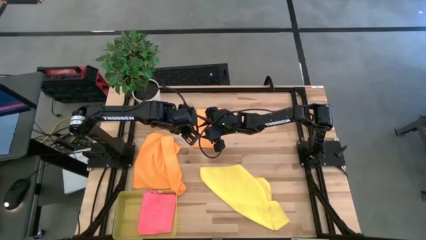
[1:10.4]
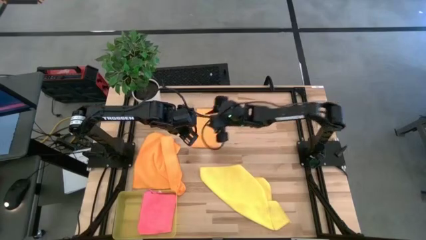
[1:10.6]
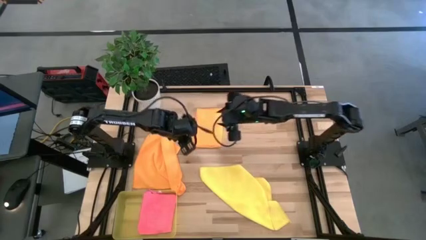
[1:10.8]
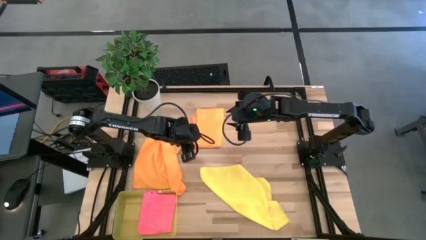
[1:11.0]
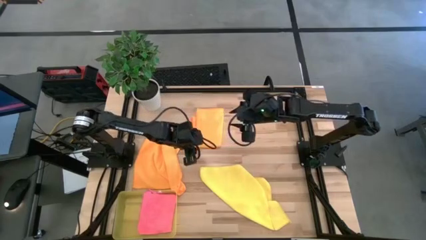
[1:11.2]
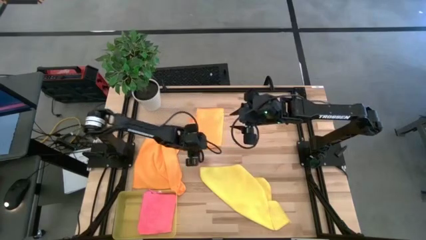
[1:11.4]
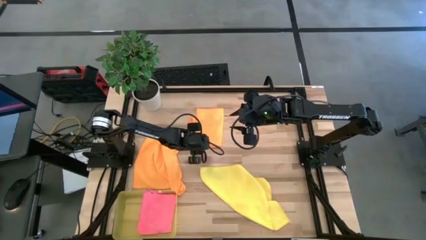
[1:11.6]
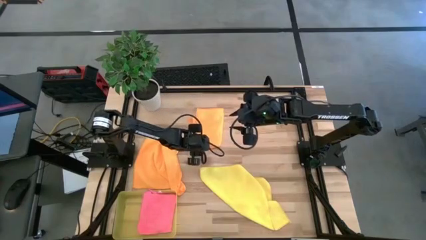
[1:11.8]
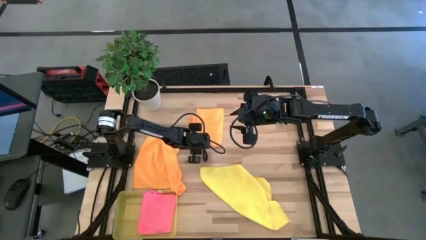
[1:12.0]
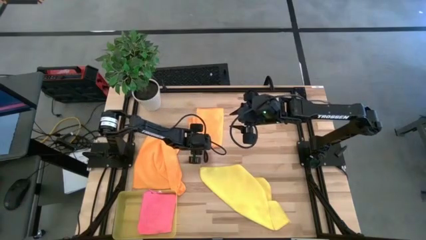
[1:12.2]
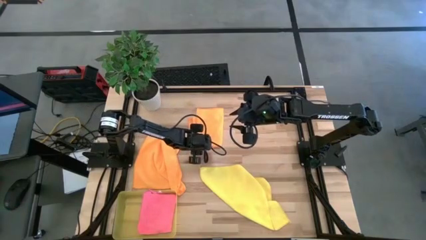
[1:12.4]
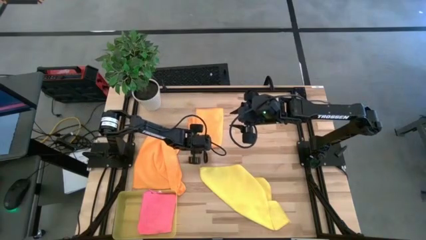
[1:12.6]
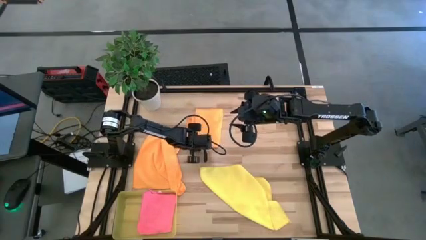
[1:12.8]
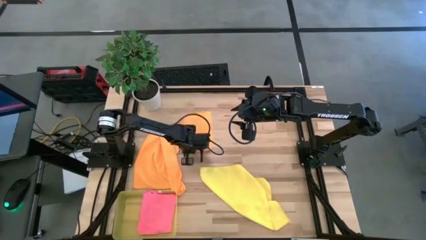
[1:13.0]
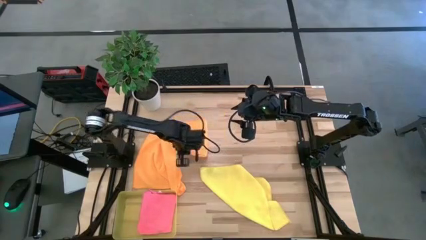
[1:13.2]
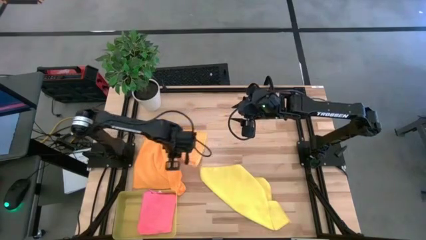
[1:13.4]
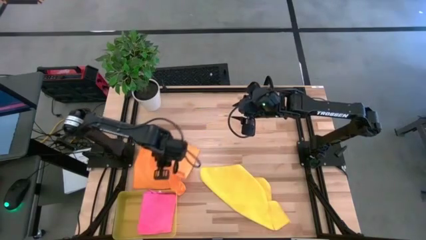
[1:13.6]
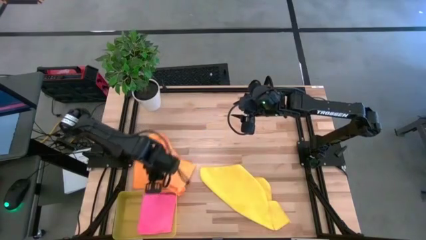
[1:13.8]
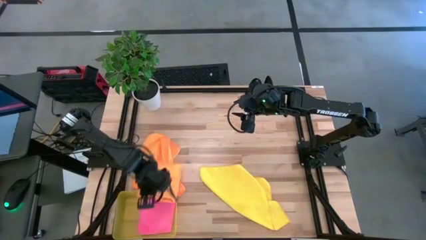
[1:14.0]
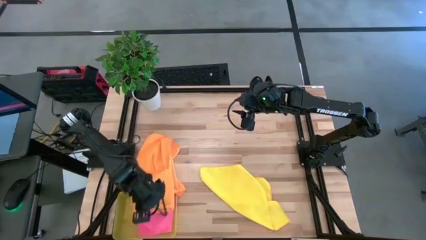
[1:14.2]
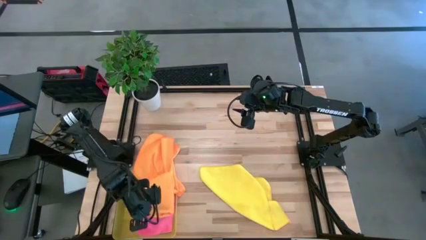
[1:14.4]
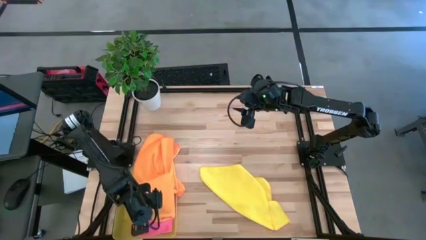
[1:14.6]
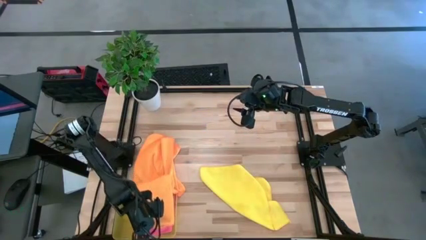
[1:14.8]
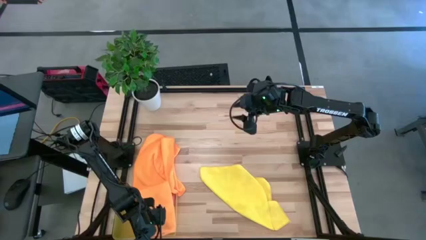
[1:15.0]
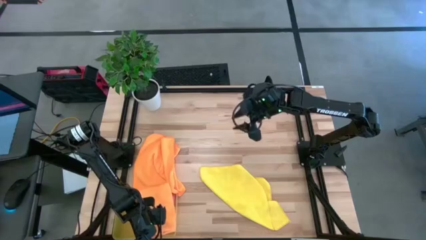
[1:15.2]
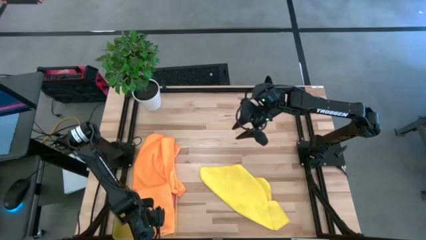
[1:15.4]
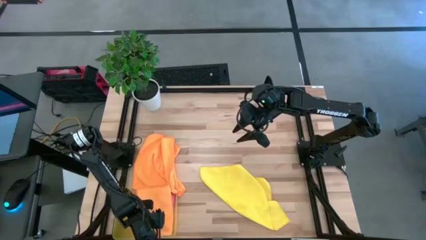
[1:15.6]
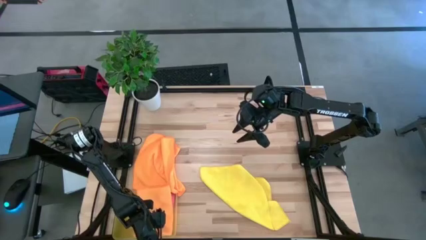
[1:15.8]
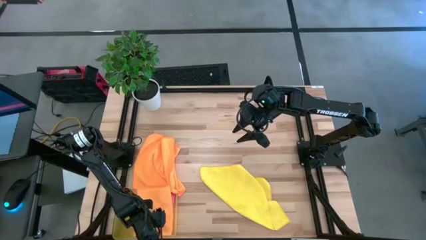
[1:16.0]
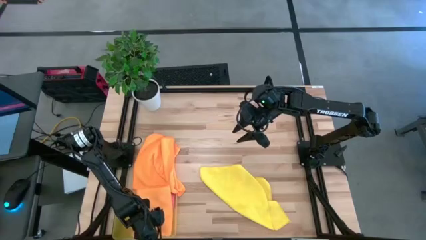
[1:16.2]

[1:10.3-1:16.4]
Task: Fold microfiber towels
Put the top folded orange microfiber towel into the yellow bin

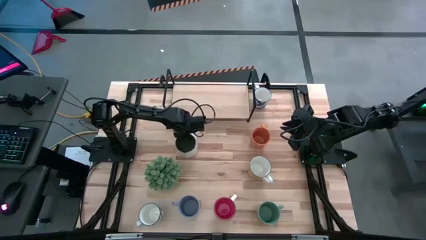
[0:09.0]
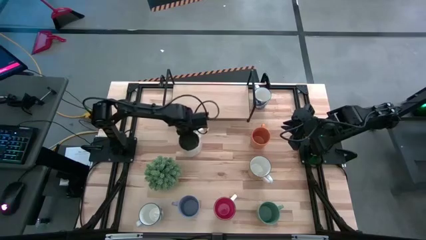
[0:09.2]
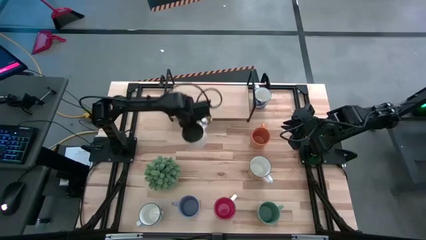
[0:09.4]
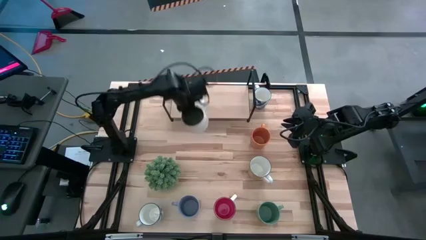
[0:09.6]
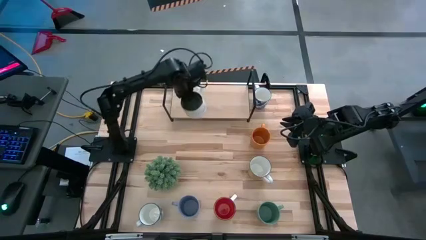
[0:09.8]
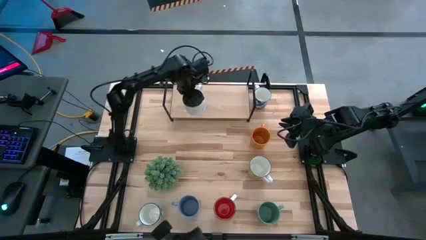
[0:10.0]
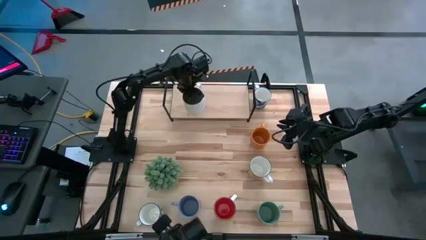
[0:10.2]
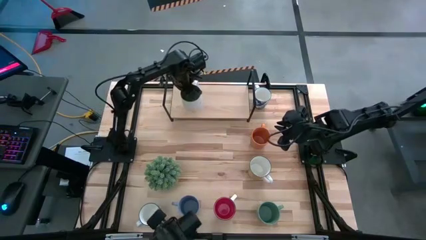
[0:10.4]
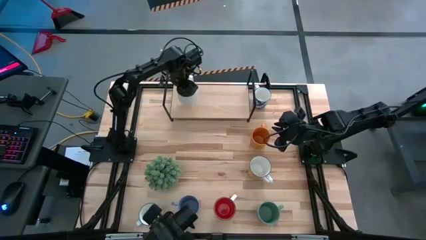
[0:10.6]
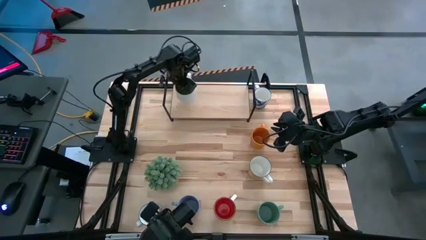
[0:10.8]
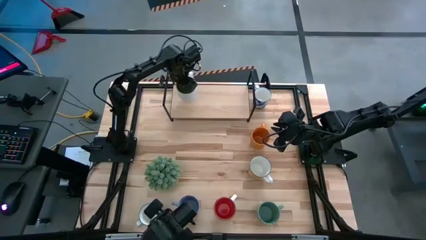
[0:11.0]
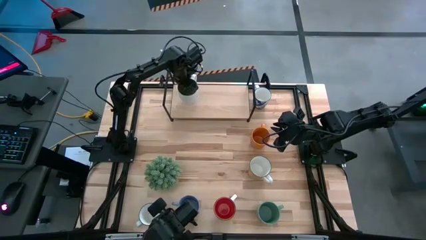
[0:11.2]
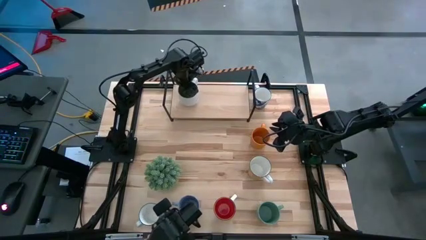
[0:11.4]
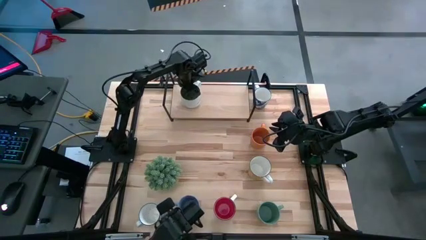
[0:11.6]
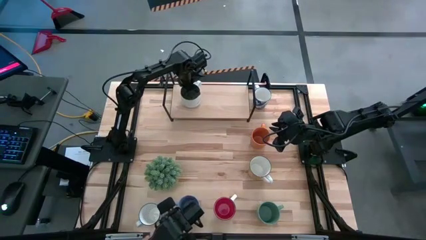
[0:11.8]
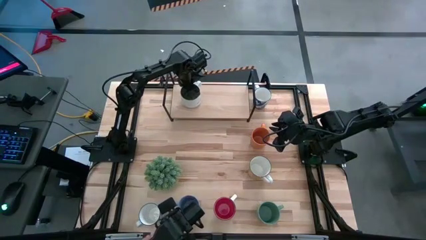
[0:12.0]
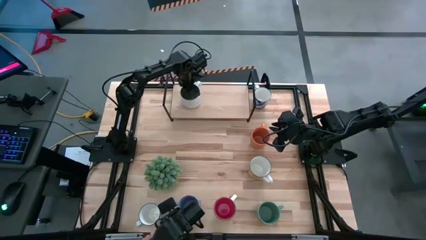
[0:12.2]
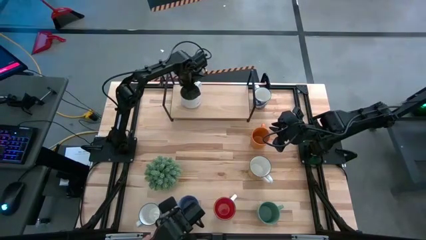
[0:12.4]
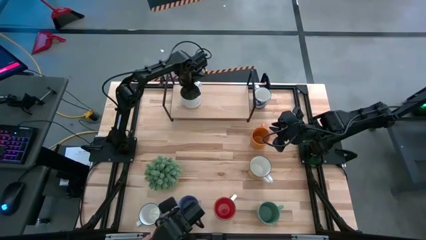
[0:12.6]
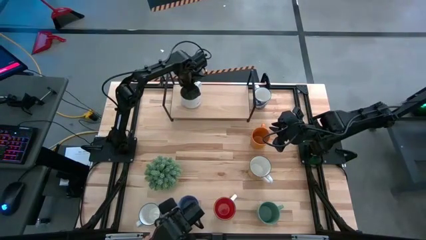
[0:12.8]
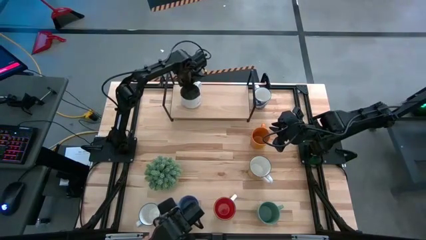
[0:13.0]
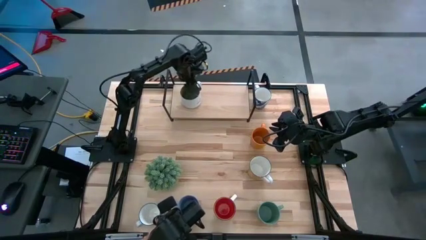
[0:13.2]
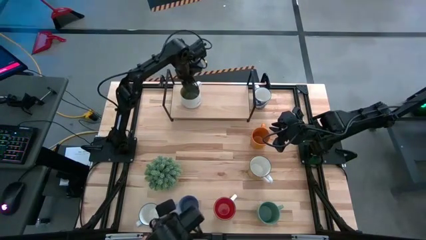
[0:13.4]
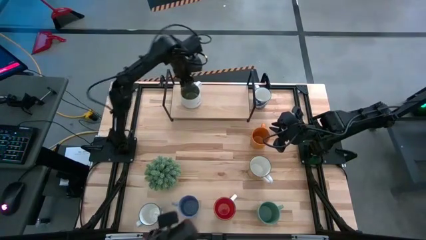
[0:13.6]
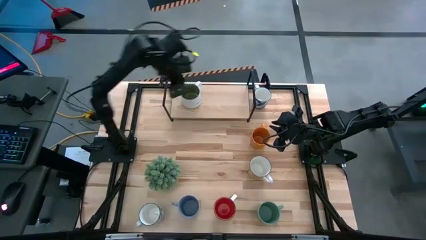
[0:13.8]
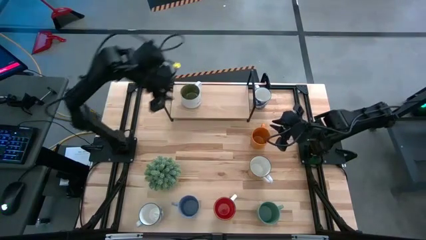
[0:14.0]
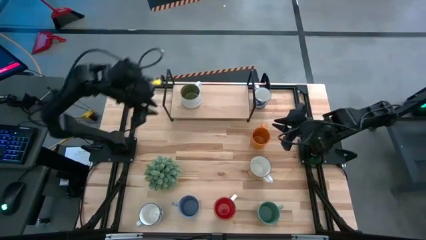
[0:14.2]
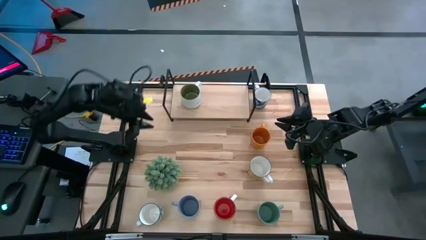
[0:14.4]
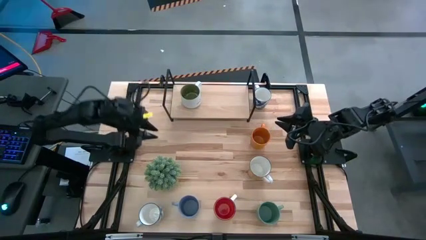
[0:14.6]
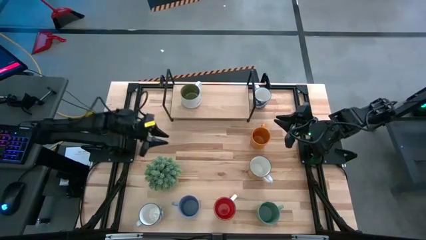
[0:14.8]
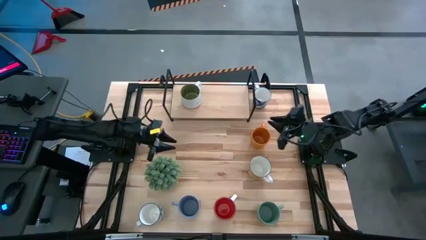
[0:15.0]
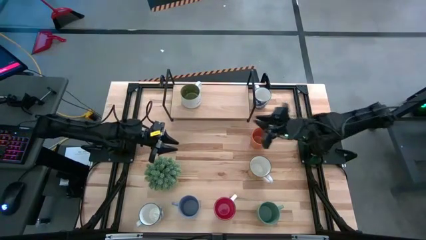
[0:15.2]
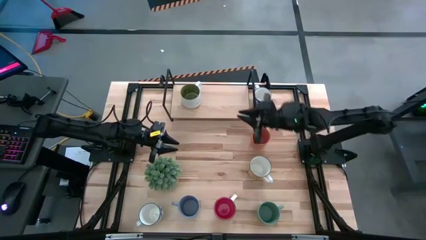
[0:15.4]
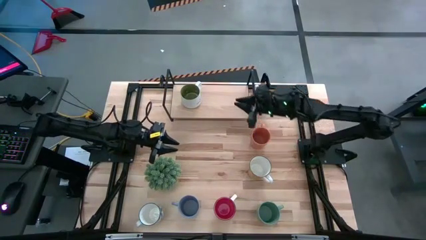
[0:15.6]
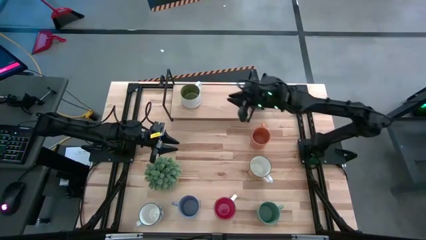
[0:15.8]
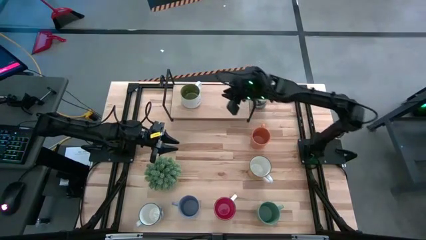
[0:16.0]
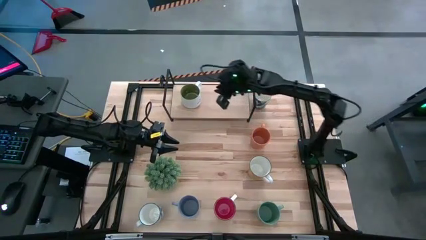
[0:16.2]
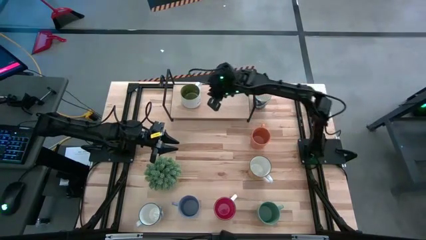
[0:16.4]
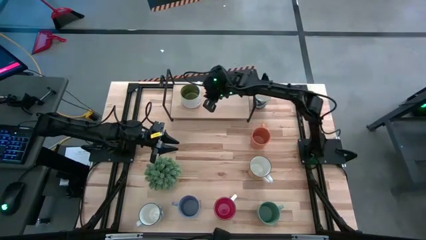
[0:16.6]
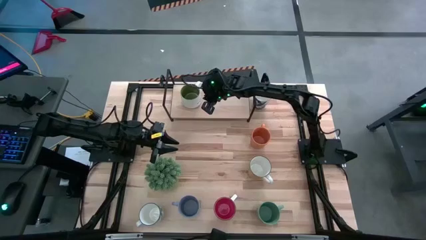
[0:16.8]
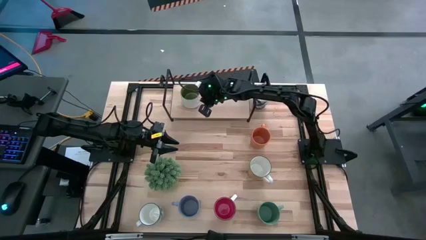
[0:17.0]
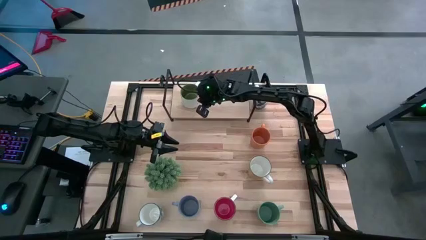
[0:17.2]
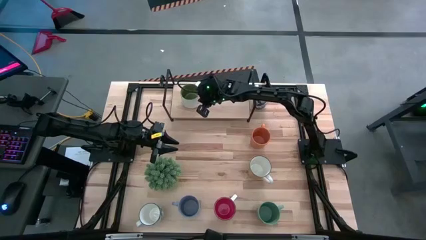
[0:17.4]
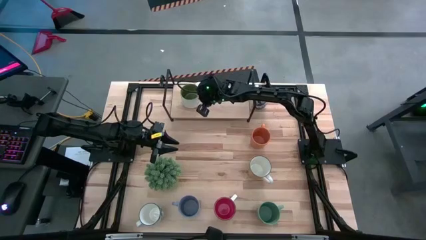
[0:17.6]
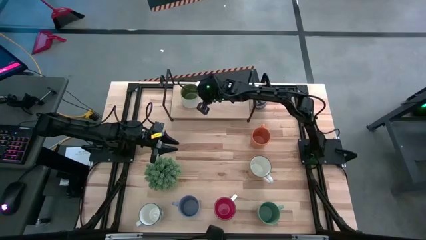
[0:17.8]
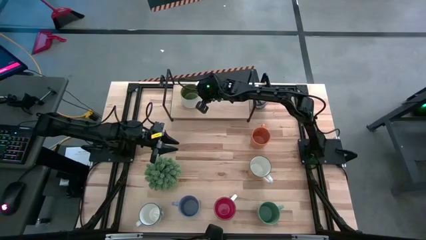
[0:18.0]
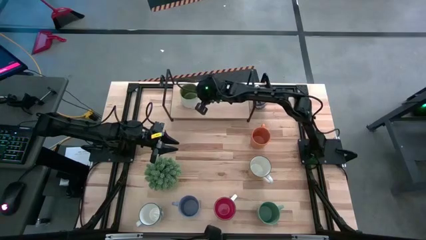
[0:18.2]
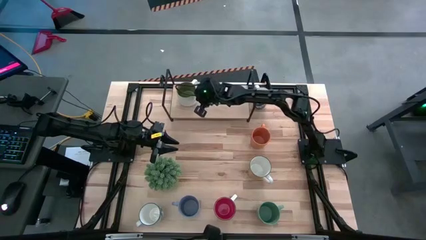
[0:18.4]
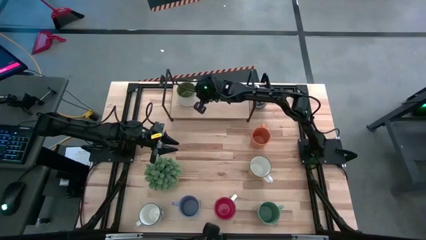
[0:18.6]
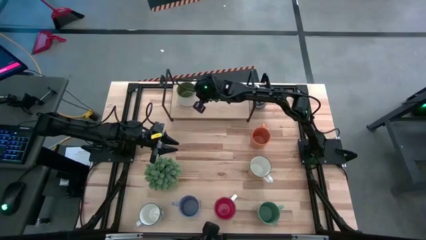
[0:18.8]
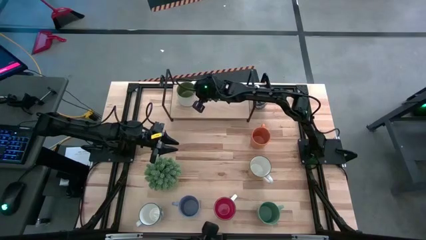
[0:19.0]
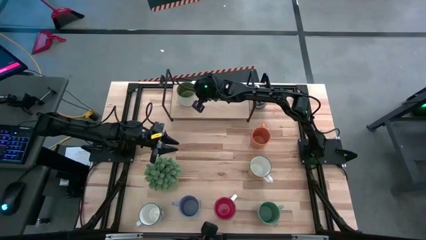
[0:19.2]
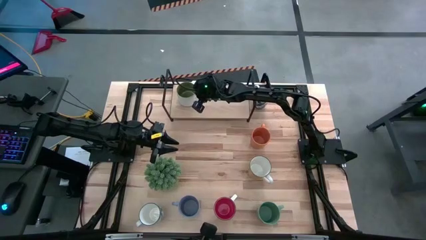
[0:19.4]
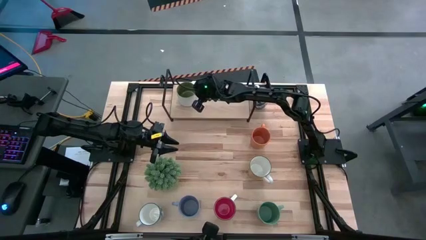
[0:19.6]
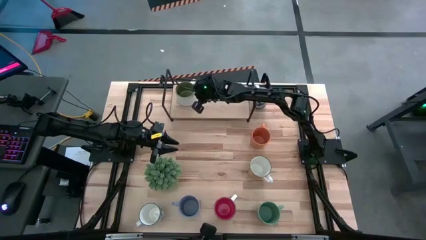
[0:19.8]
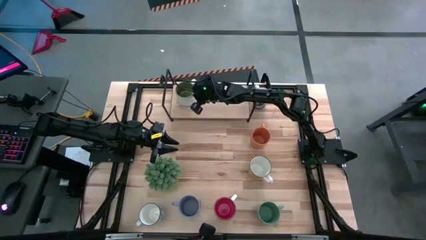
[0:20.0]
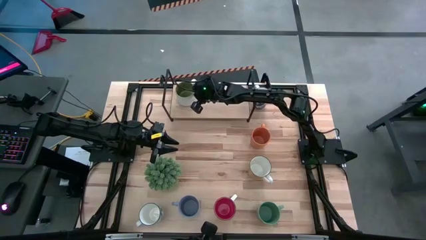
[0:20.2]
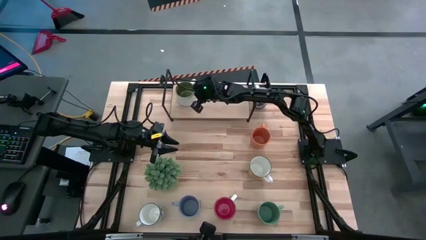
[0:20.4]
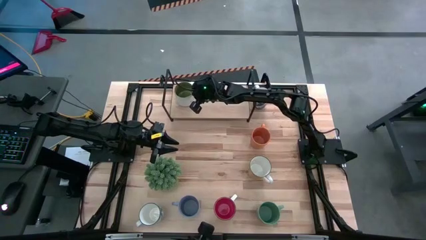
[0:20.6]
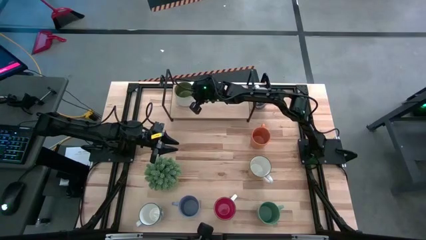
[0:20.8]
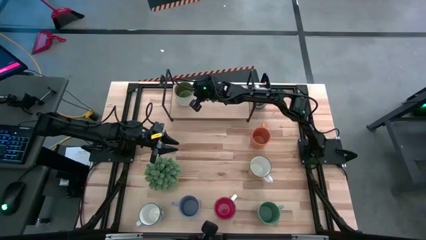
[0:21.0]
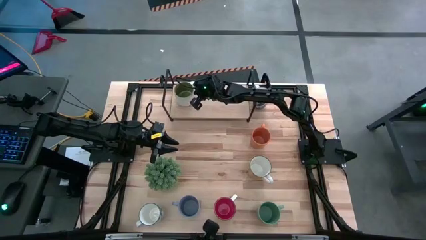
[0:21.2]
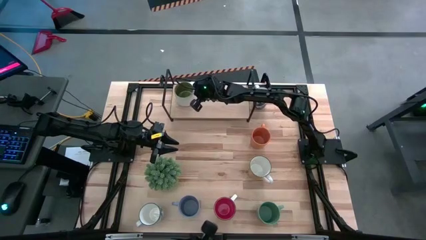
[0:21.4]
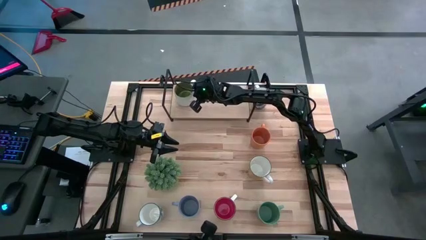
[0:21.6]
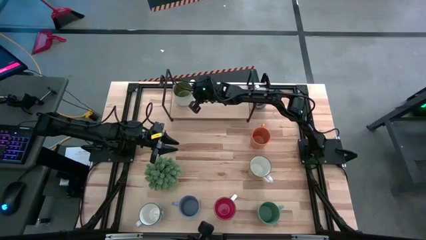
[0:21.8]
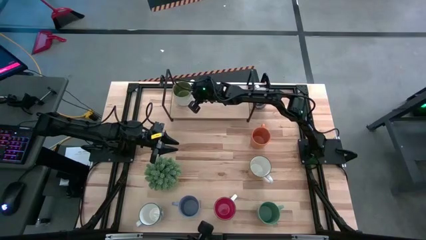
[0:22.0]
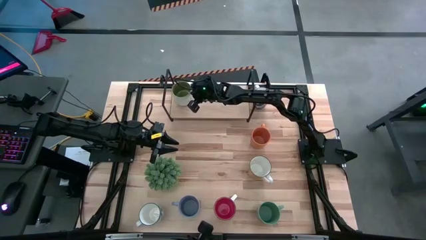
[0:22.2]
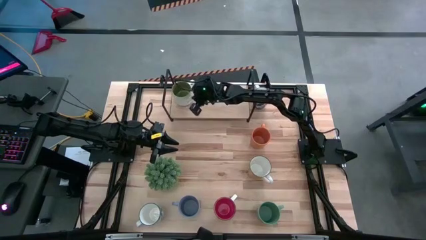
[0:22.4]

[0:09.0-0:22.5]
Task: Place coffee mugs
Put the white mug on the shelf
